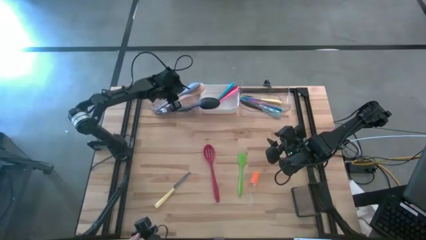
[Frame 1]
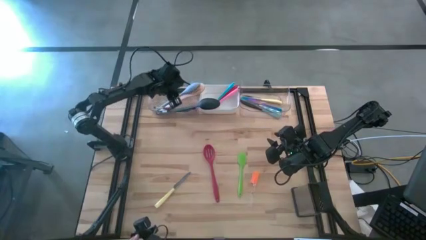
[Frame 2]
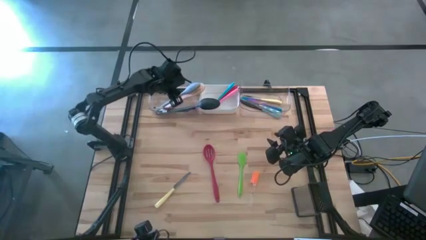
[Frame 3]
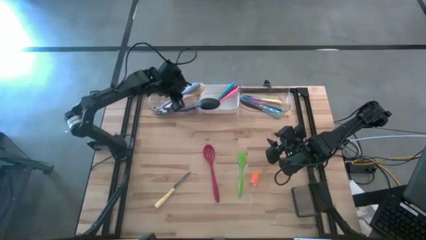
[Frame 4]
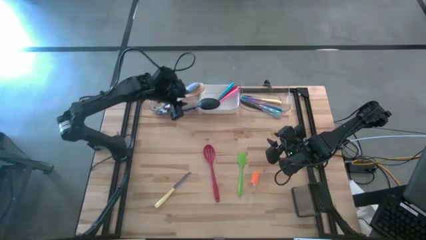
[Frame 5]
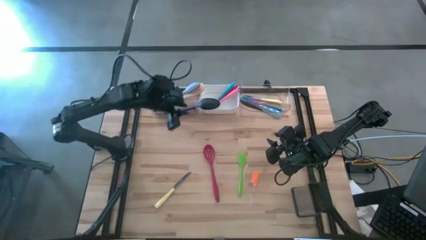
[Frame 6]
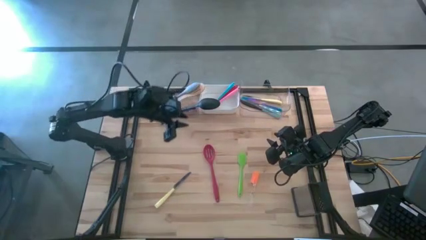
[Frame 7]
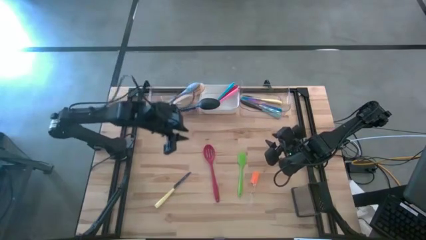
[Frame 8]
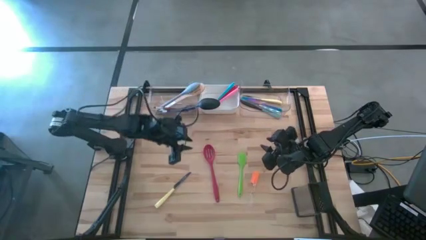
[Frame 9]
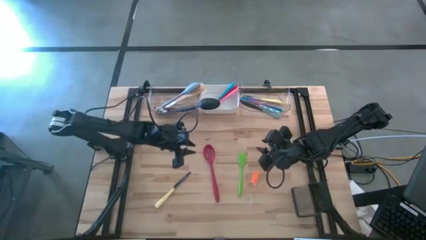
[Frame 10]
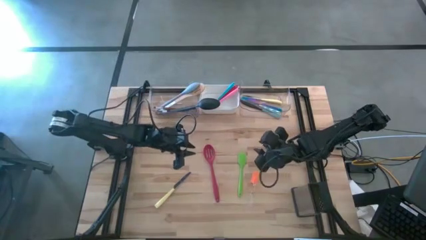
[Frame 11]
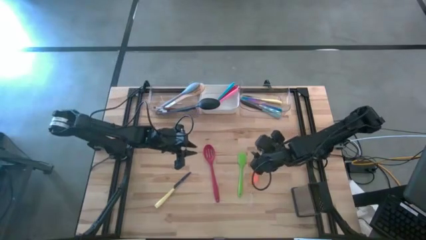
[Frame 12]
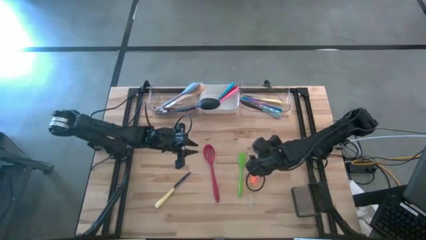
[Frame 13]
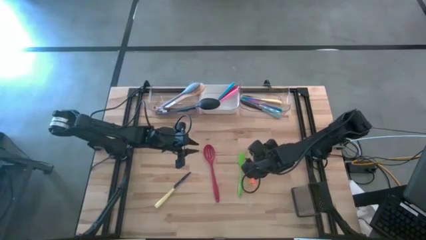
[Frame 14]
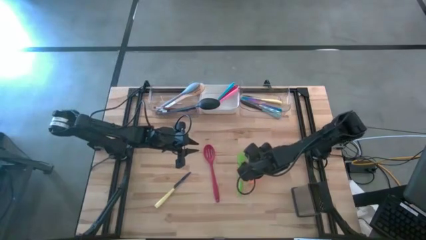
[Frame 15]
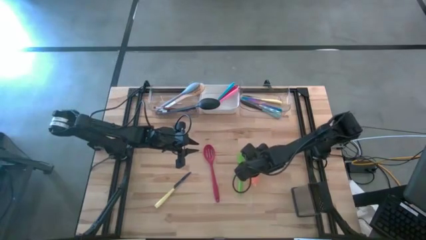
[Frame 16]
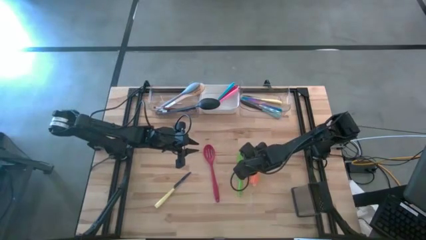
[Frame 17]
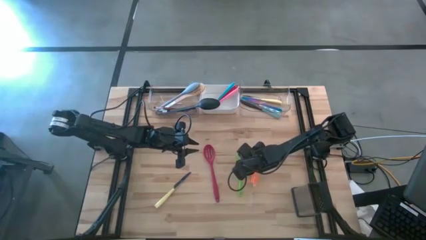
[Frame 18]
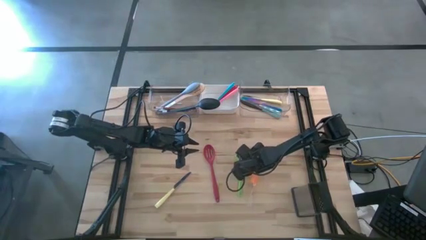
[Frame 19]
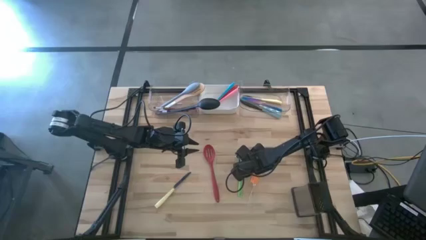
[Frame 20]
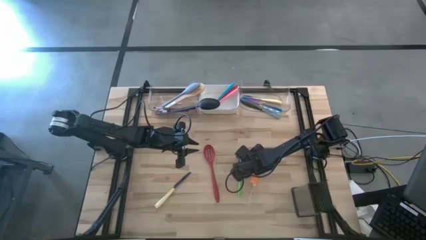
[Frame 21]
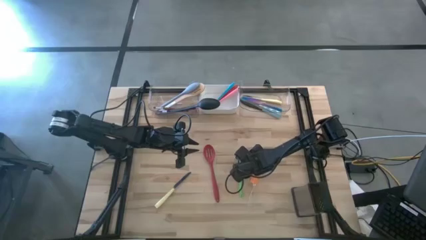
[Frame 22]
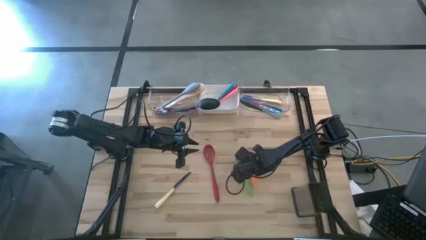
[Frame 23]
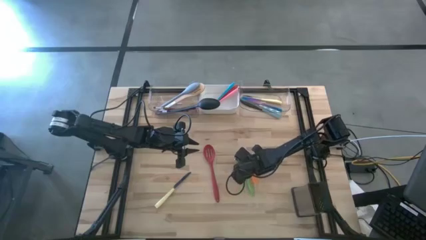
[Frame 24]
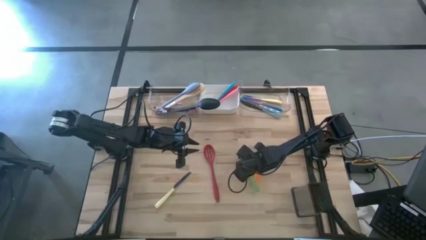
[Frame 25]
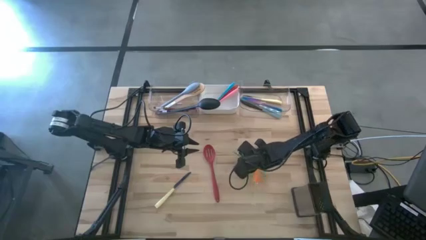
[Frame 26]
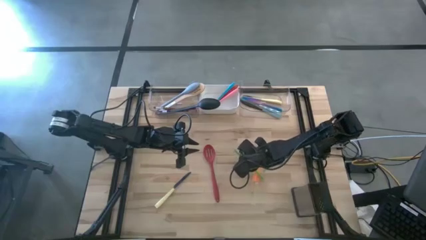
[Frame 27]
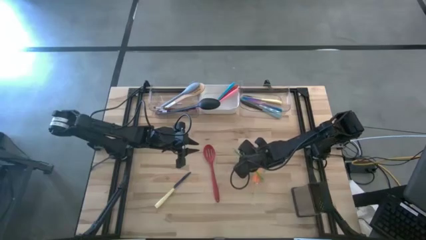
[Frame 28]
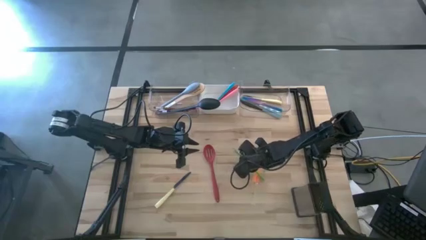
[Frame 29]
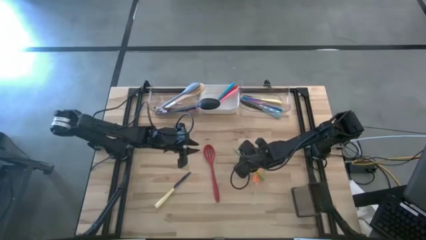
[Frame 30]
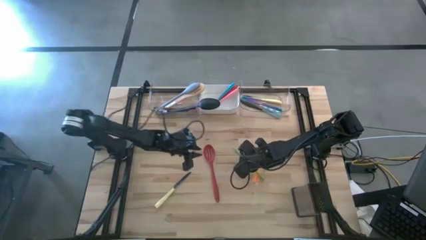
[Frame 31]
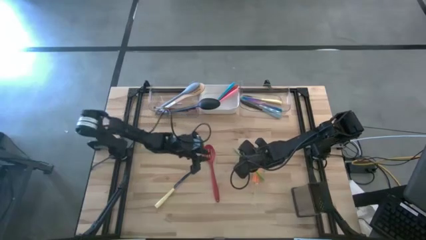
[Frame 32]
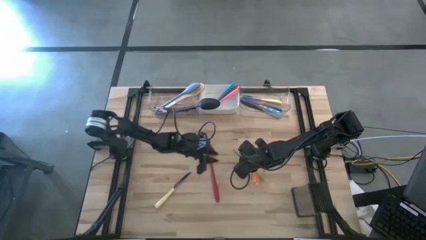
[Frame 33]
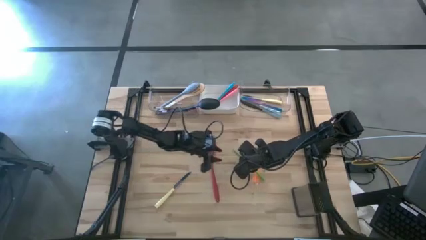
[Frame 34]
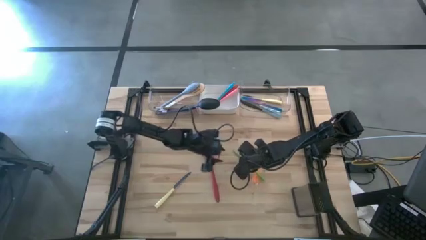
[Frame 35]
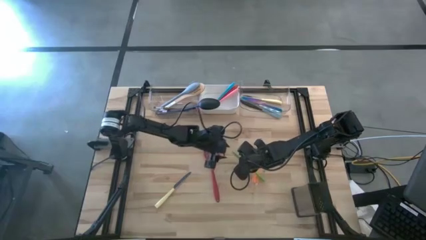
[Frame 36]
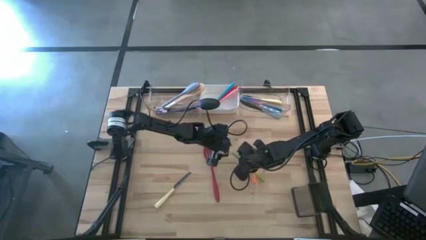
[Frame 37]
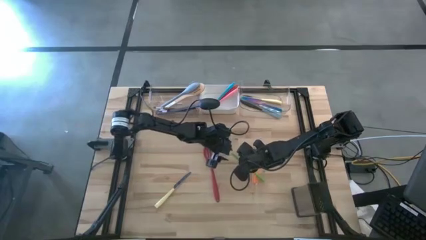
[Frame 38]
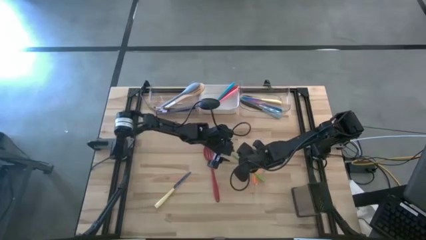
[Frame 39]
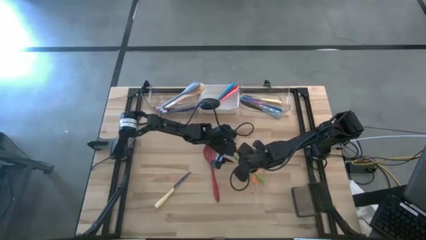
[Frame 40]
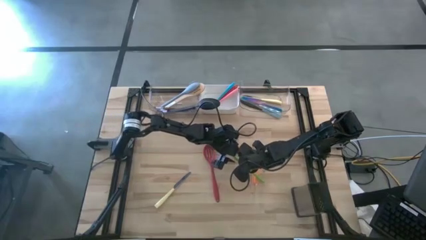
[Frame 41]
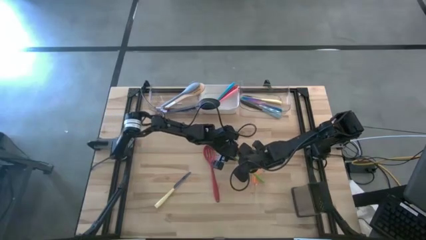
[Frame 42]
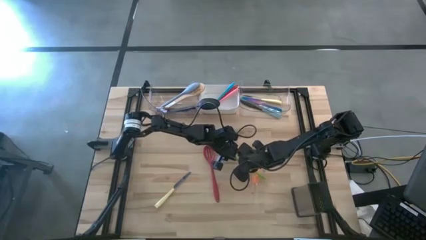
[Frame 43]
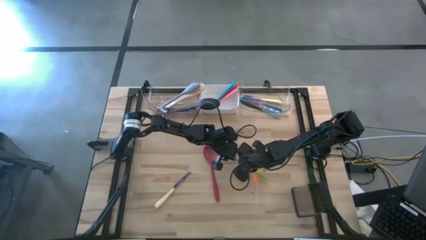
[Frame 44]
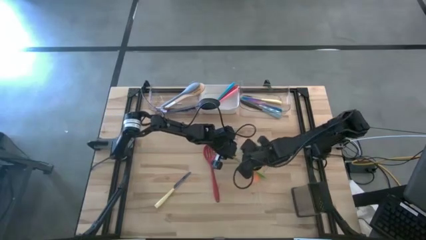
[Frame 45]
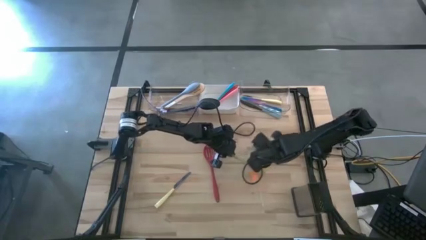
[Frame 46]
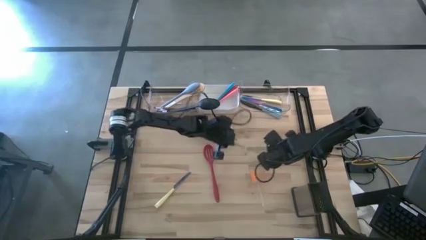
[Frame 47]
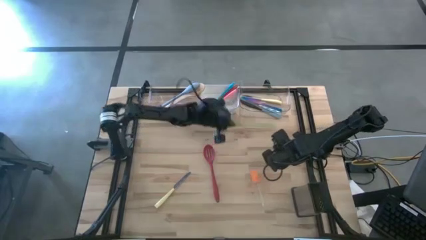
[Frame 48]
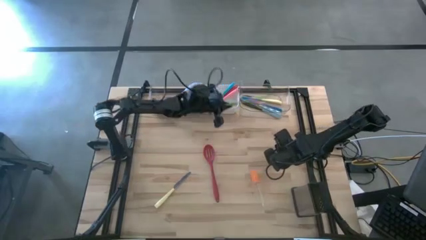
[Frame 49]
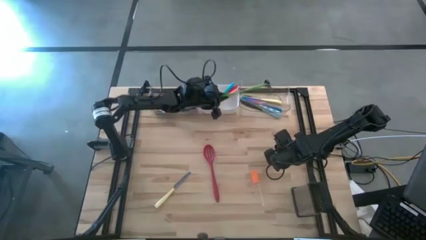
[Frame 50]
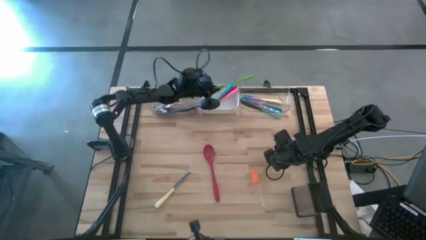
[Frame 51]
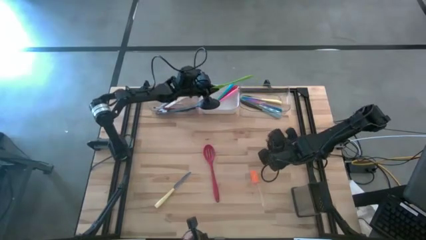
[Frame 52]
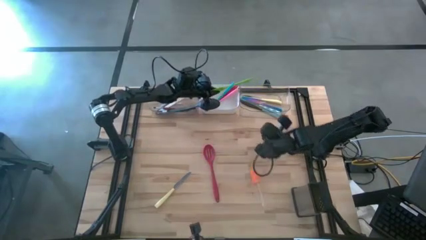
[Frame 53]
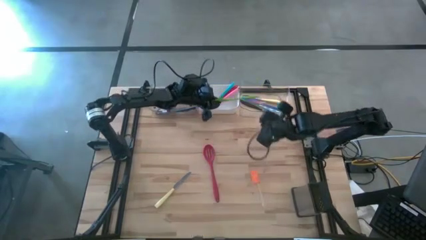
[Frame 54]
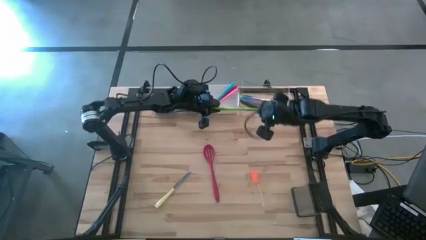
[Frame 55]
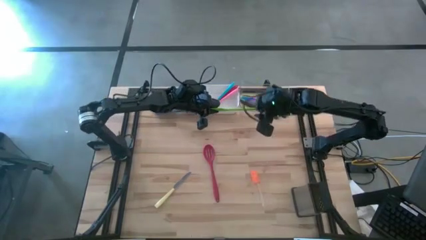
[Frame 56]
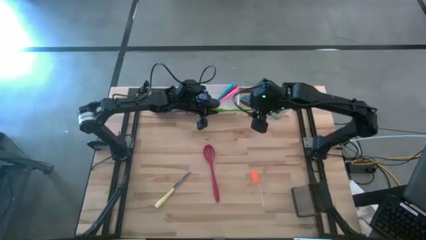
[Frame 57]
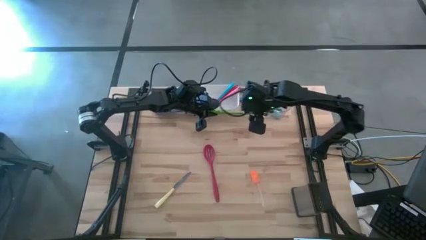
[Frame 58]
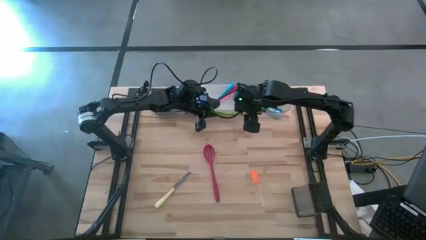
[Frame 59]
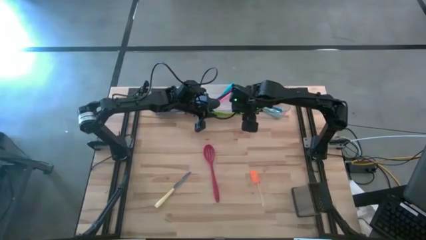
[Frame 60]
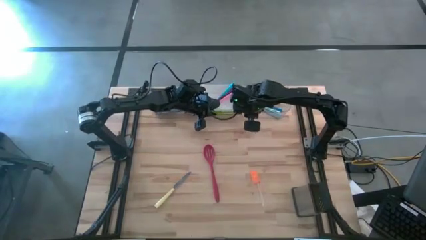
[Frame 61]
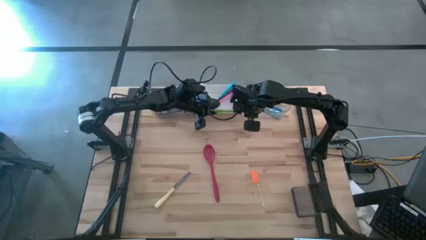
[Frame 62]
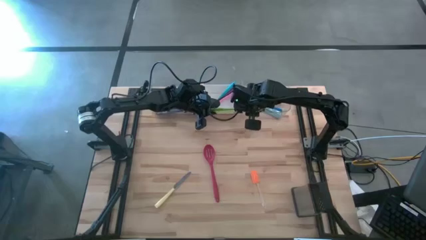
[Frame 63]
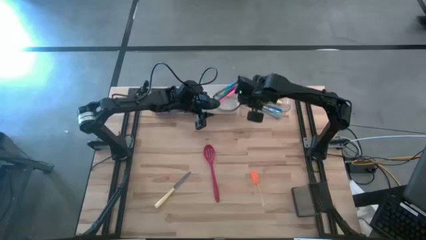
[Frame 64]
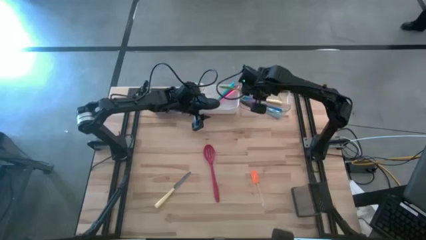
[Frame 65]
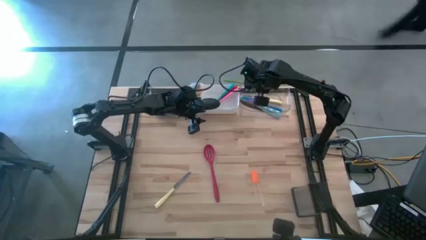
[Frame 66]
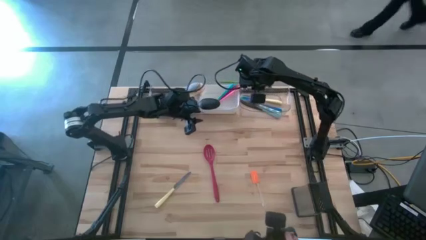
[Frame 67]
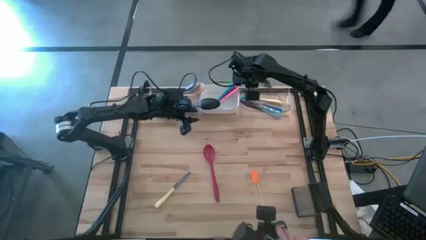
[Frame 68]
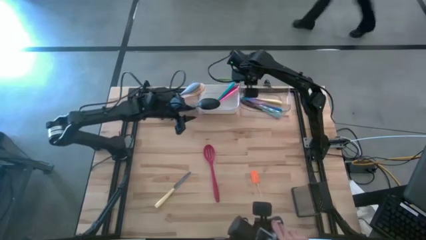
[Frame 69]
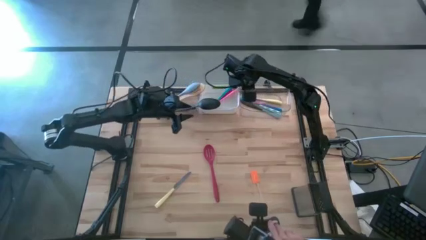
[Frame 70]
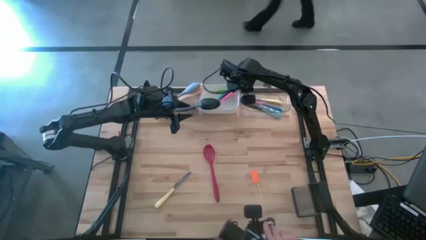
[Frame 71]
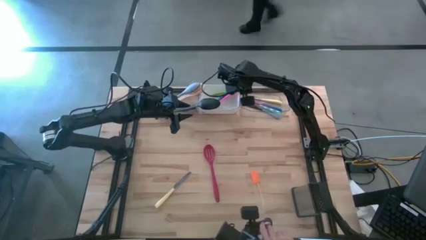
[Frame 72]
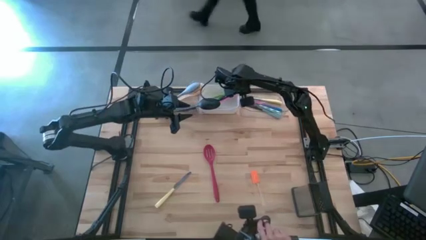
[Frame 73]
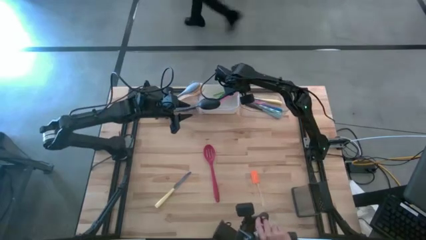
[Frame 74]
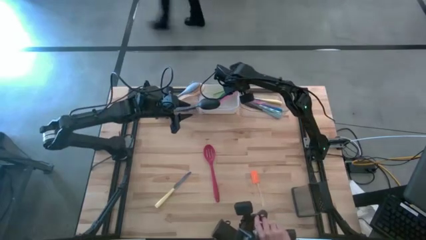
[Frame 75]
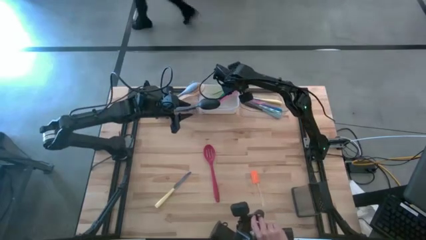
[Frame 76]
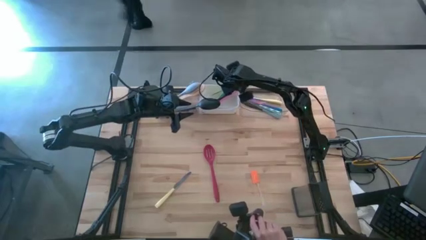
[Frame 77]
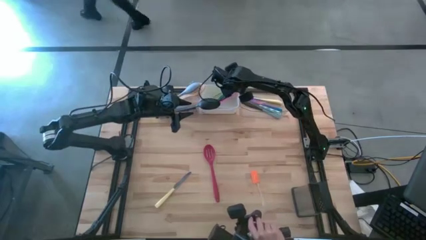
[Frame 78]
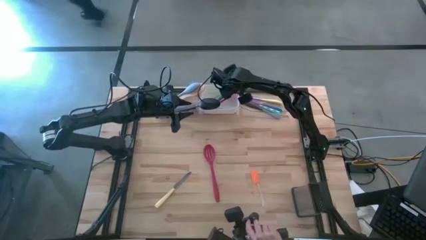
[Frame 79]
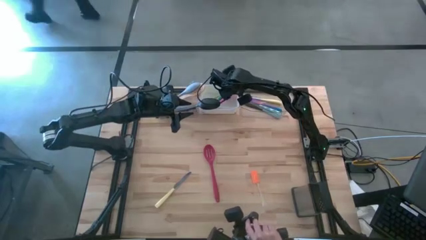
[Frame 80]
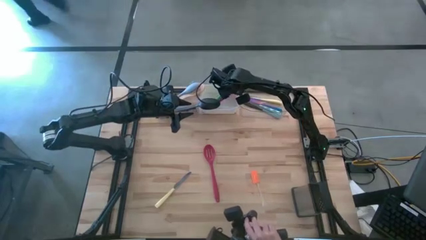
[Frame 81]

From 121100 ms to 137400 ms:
Task: Pick & Place Kitchen Items
Put the green spatula into the white bin

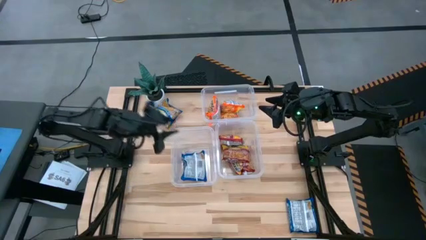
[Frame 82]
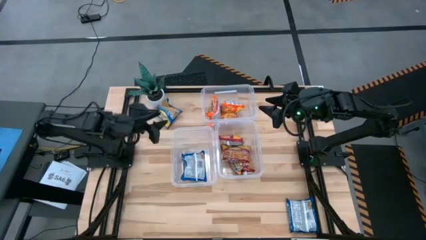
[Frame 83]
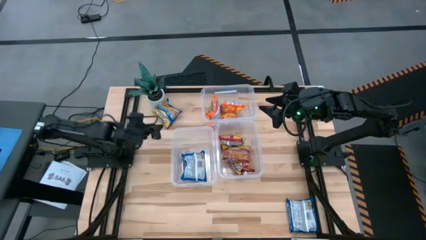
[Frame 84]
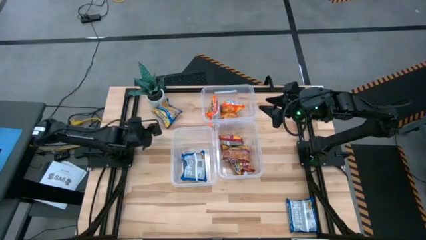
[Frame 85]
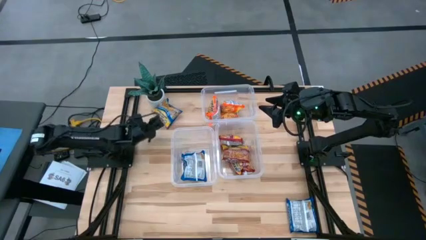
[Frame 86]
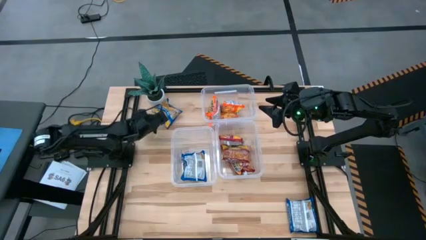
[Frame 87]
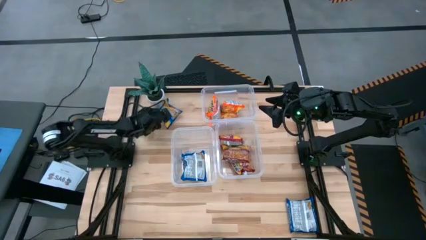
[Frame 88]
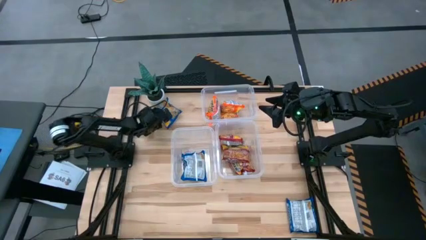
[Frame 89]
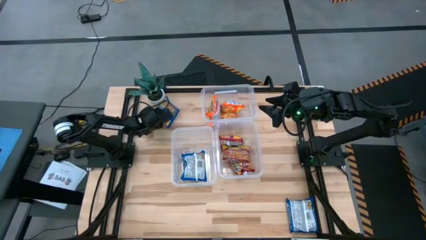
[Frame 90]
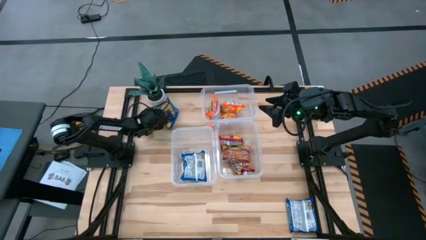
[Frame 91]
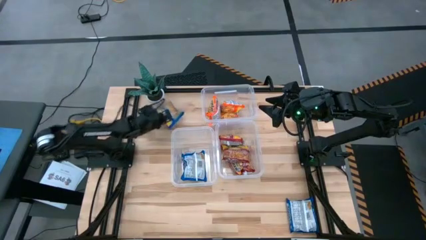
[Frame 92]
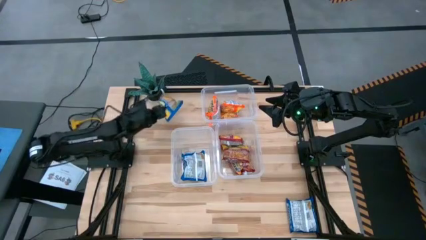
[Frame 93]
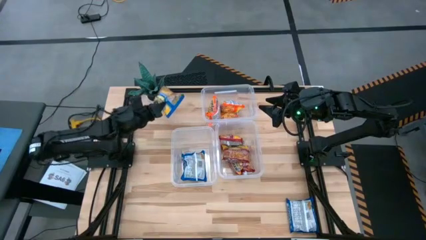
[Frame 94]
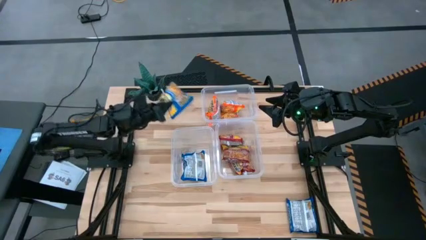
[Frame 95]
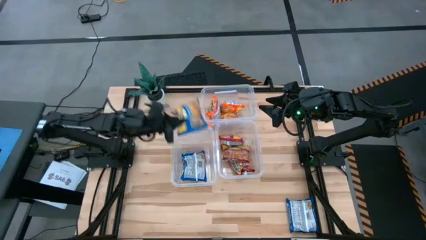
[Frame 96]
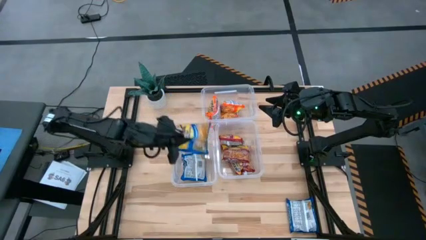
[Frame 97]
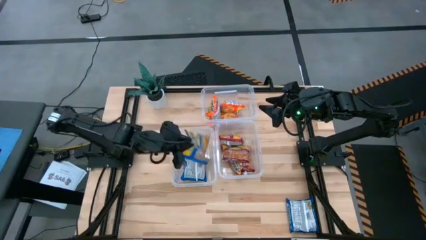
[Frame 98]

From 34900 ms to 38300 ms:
Task: Sort Maruchan noodles
Put the top blue noodle pack into the bottom left transparent bin
